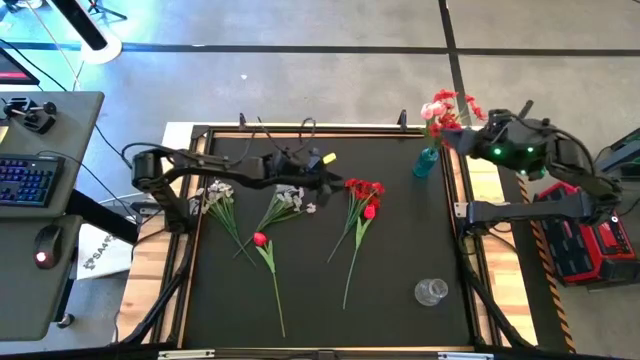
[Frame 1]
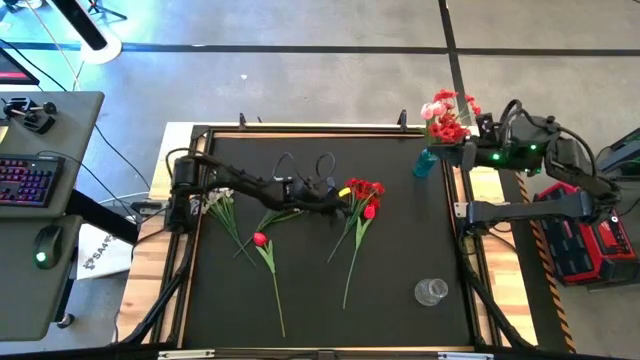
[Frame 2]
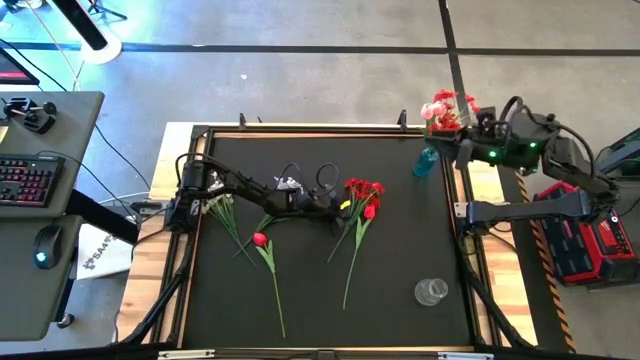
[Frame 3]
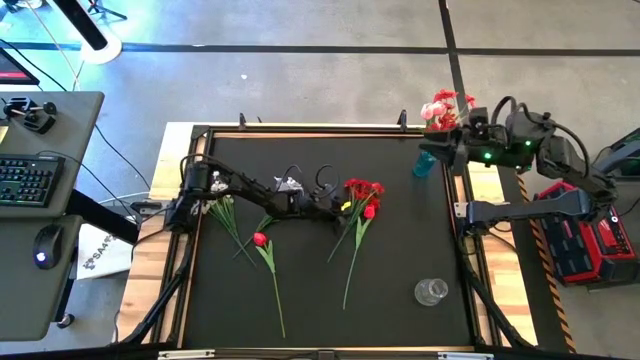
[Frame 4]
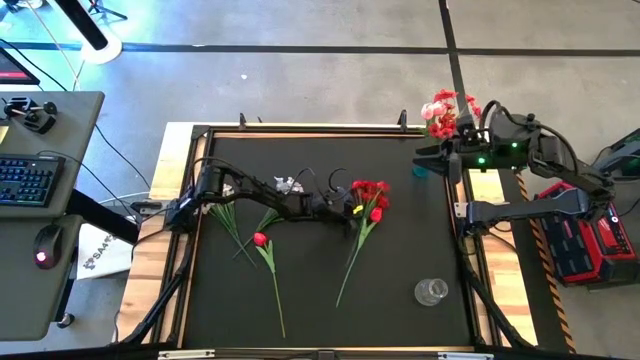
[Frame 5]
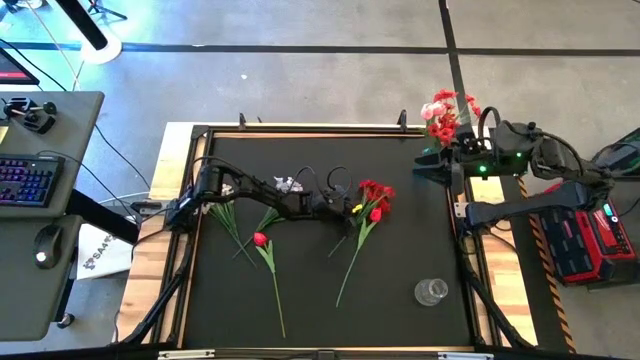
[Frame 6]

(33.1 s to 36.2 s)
Task: Sort flowers into vase by color
Put the red flowers into the blue vase

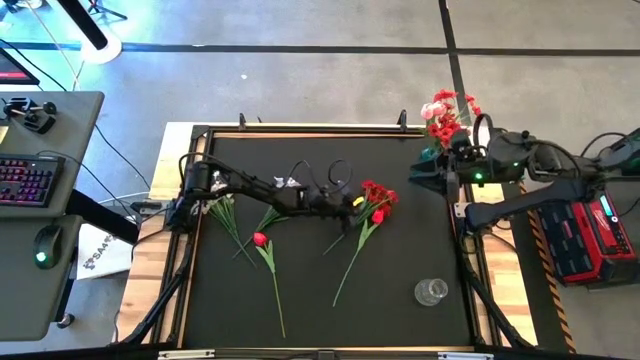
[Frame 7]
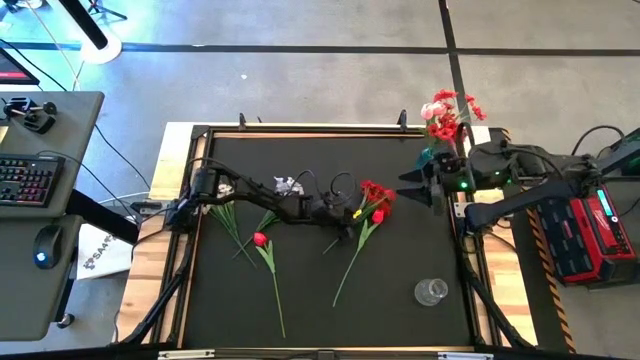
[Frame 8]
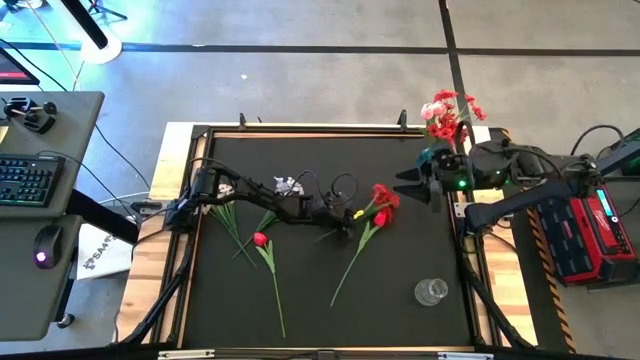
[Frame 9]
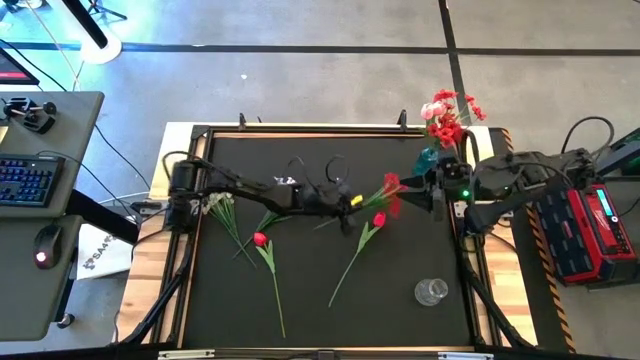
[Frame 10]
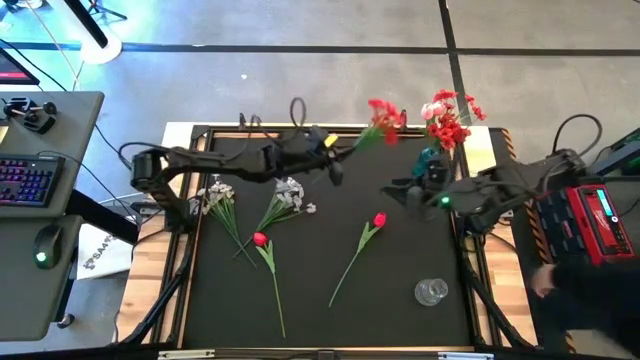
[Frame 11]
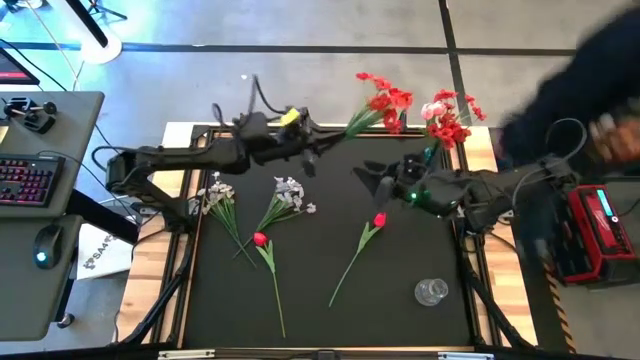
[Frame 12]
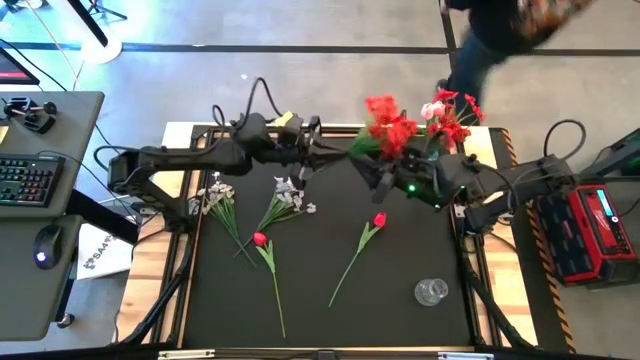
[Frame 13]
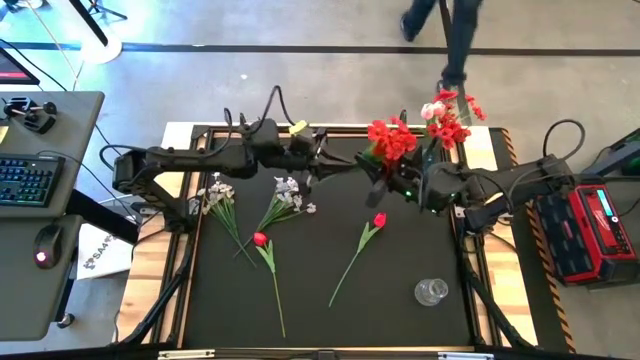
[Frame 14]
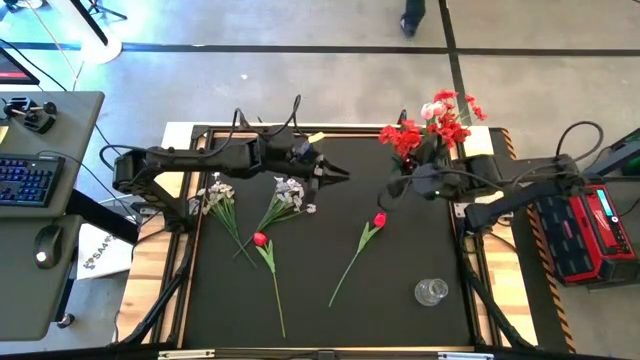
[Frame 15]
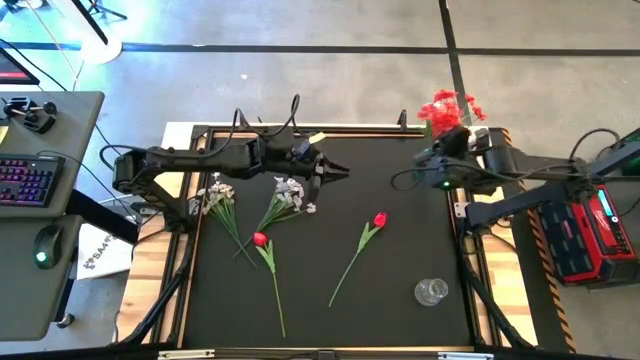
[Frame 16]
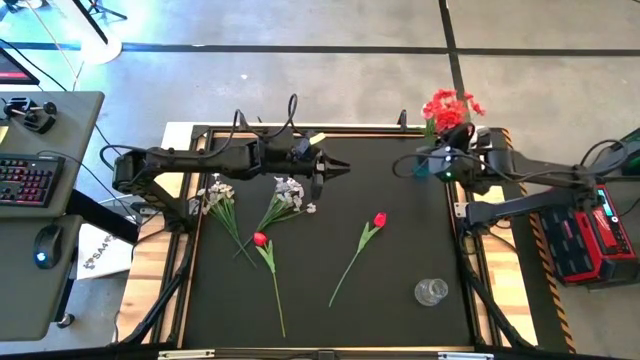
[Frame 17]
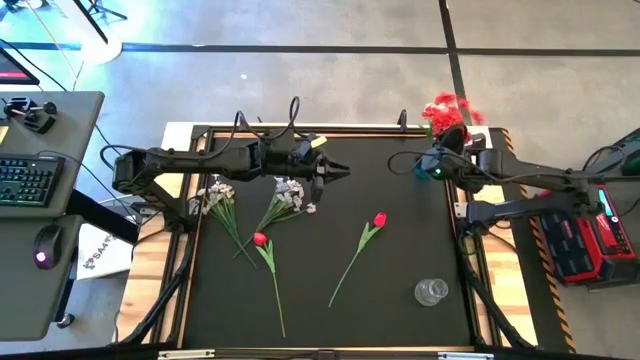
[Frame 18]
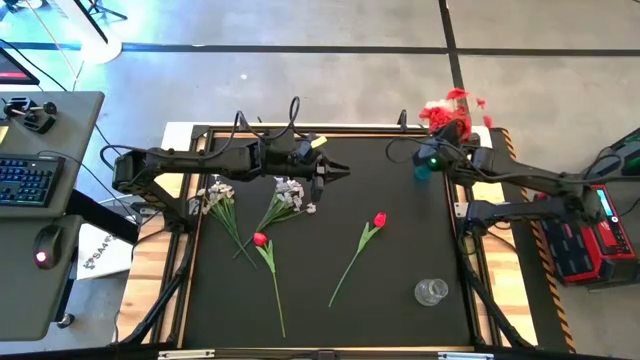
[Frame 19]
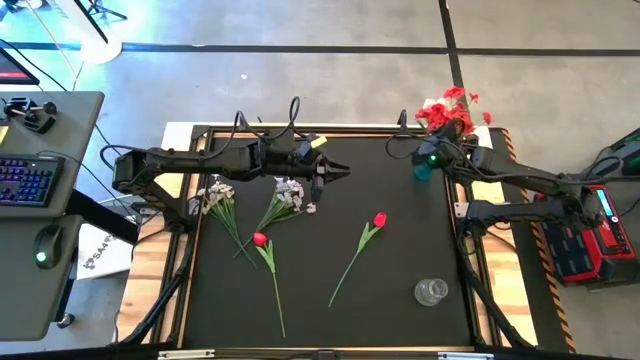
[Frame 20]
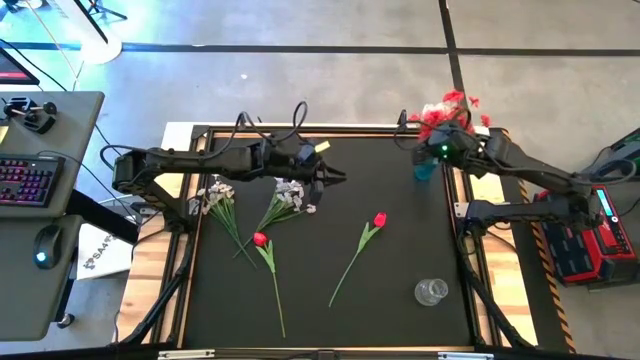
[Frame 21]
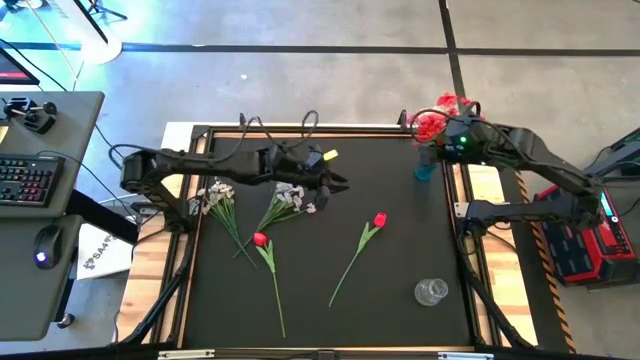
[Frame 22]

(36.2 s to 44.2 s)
Put the red flowers into the blue vase

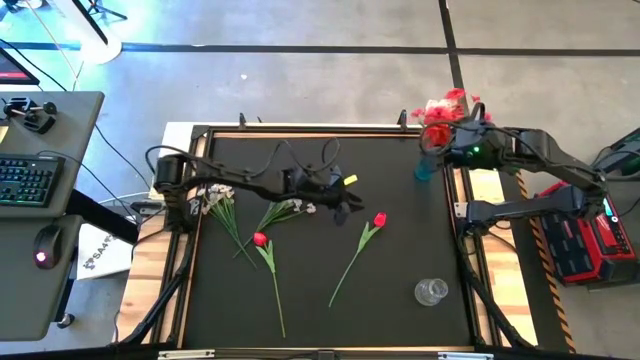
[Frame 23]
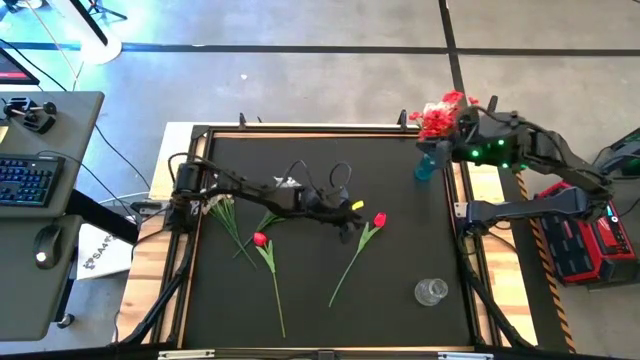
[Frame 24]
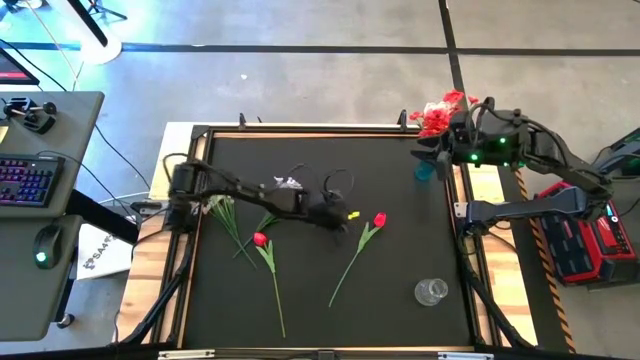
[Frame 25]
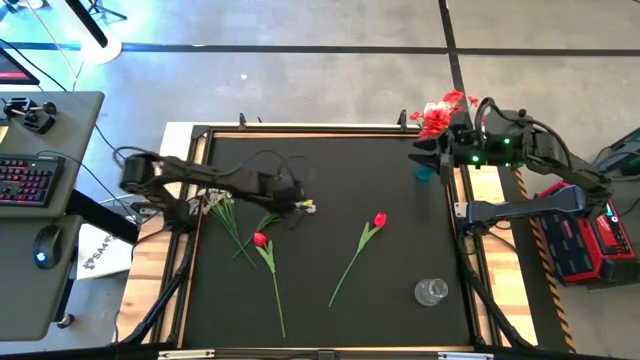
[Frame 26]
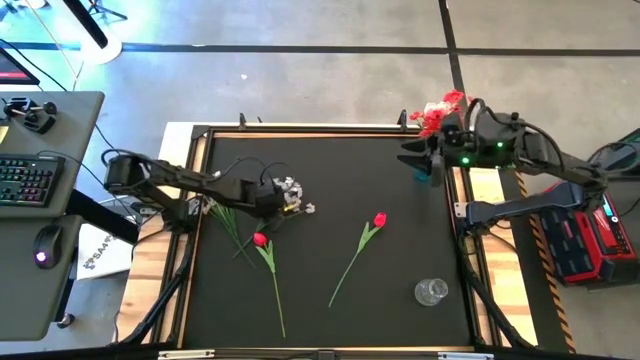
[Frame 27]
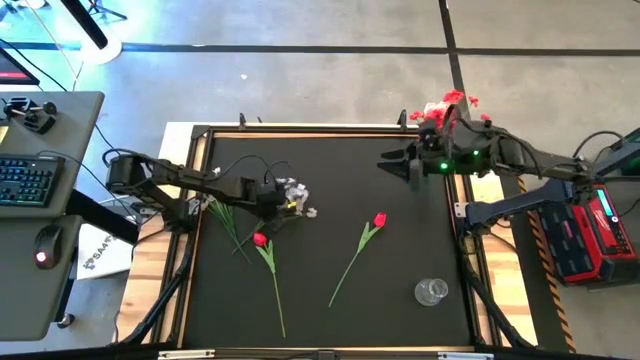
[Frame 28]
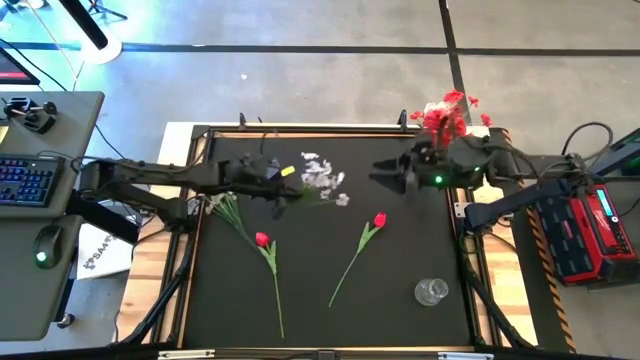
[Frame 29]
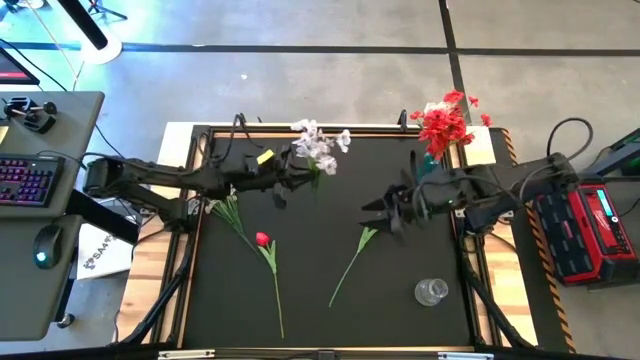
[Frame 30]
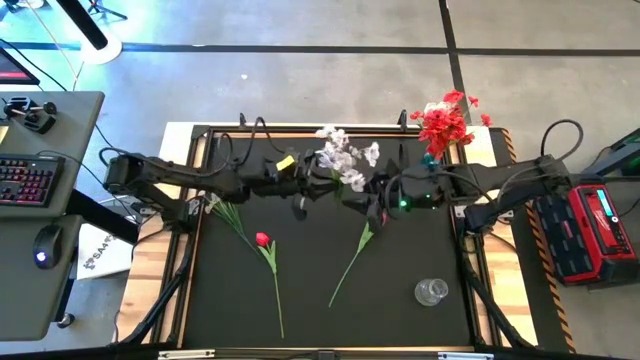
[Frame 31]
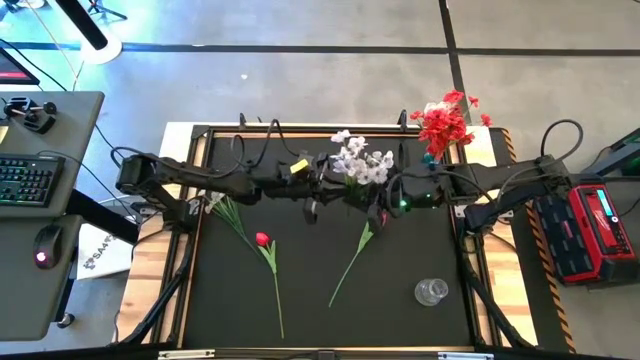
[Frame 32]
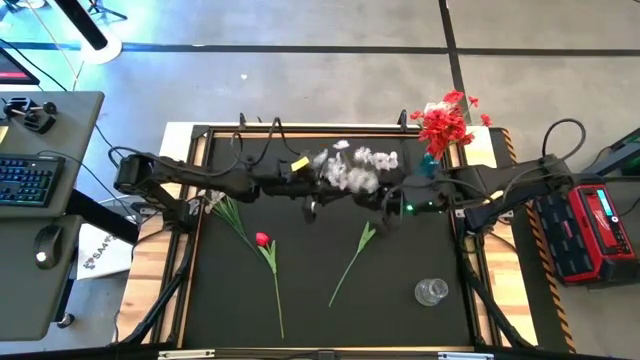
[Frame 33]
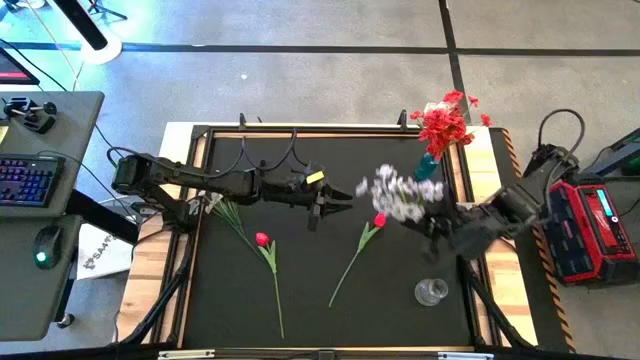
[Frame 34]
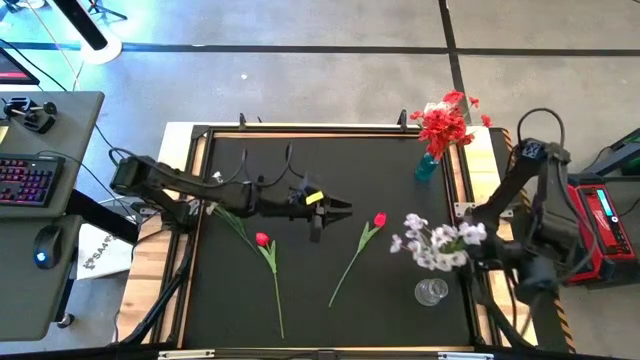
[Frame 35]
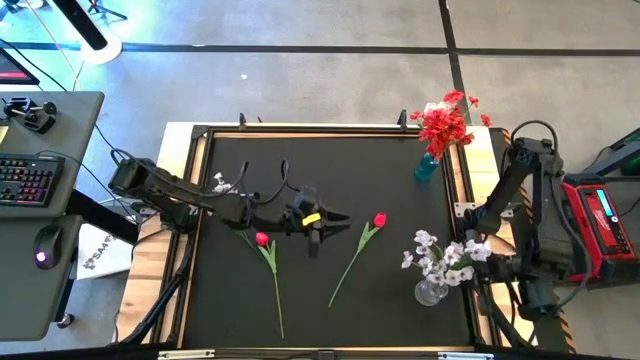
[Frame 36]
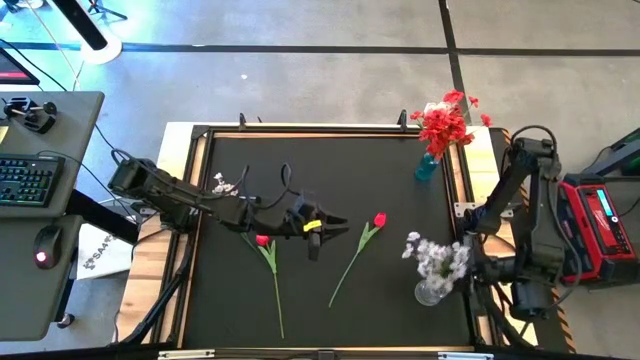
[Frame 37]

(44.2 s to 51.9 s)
Put the right white flowers into the transparent vase

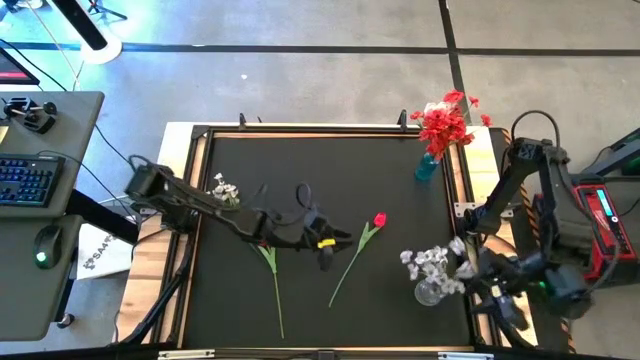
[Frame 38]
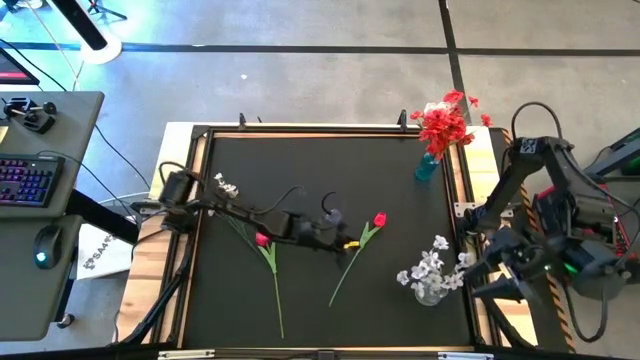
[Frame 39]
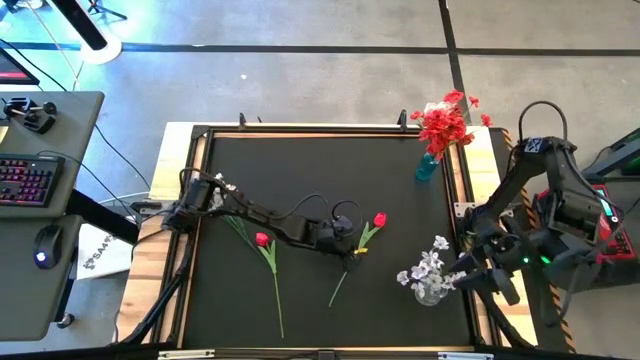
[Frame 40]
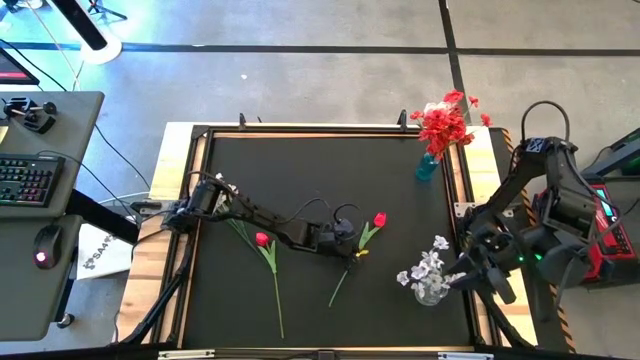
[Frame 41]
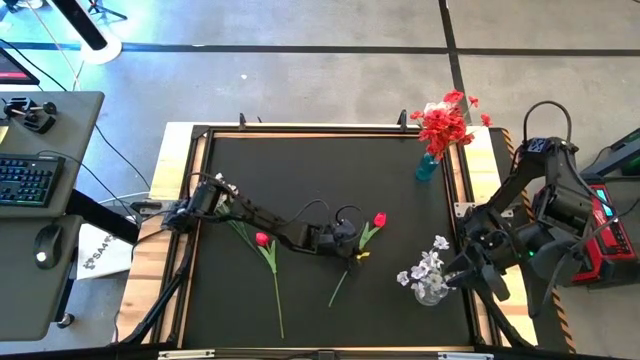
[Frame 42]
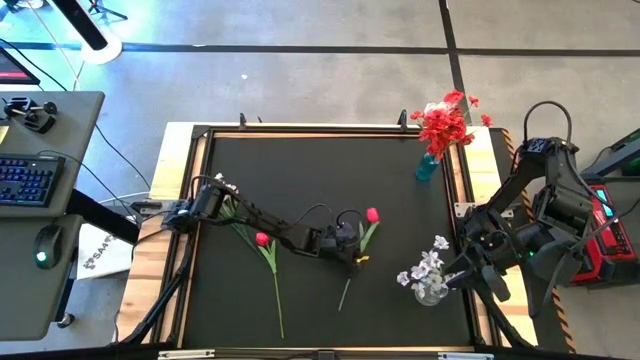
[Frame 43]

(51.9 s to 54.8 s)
Put the right red flower into the transparent vase
